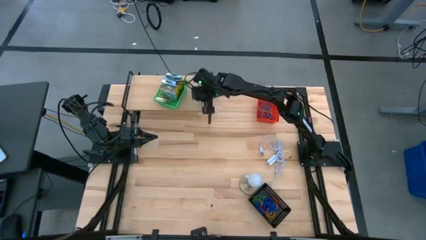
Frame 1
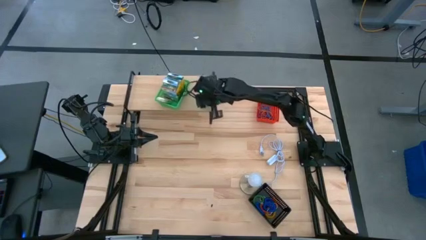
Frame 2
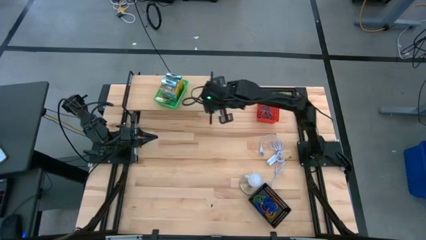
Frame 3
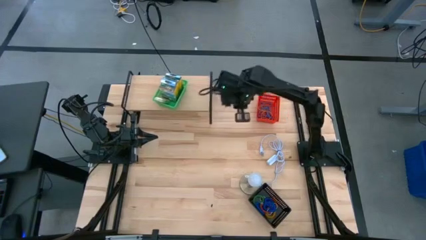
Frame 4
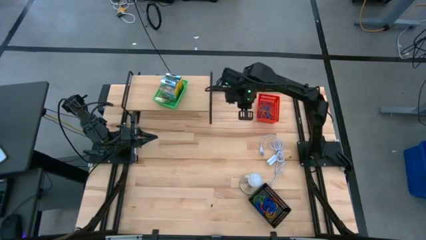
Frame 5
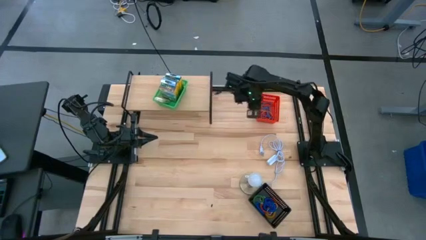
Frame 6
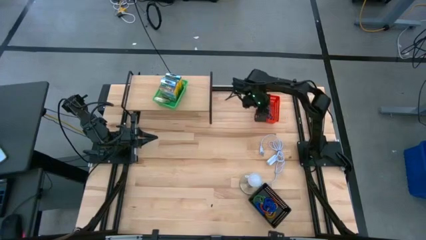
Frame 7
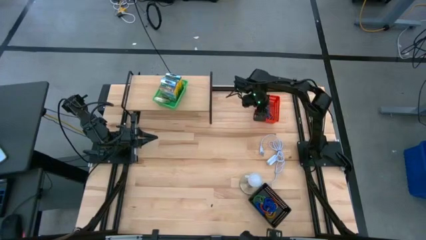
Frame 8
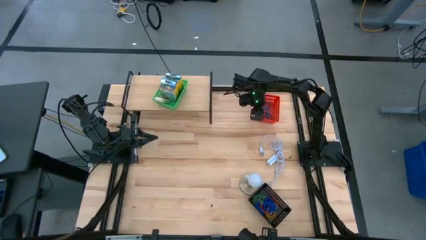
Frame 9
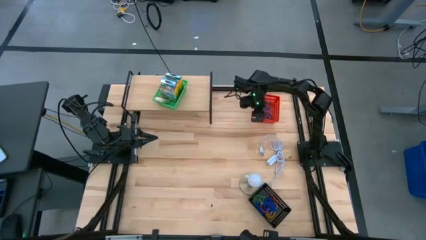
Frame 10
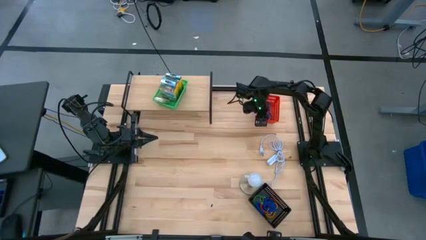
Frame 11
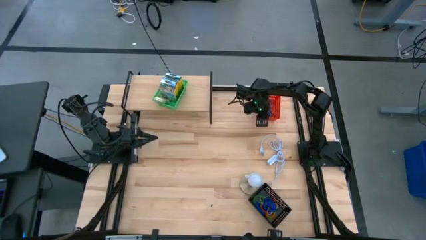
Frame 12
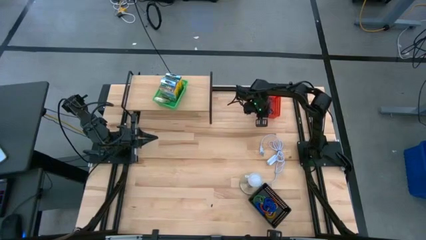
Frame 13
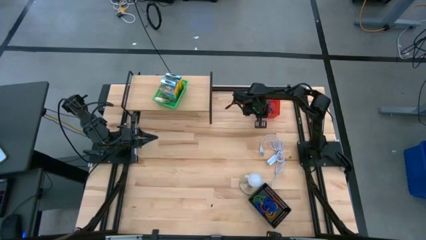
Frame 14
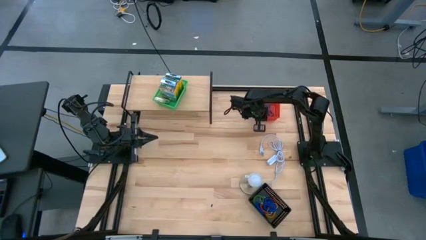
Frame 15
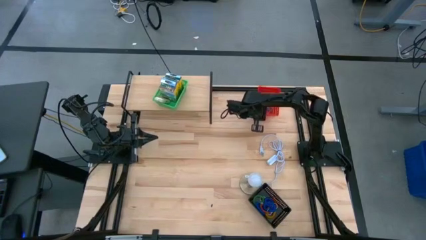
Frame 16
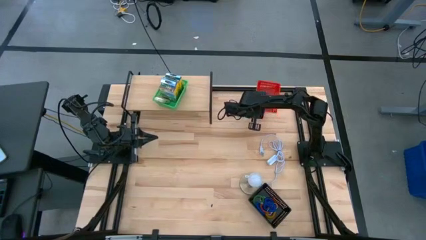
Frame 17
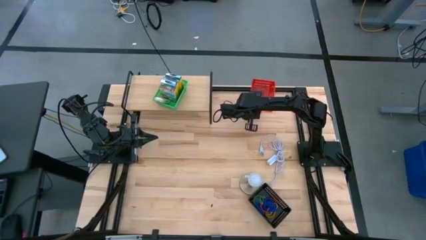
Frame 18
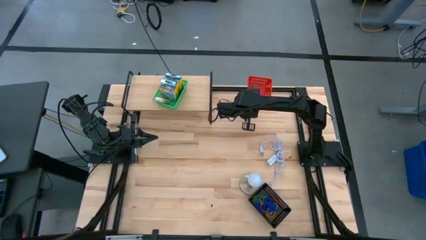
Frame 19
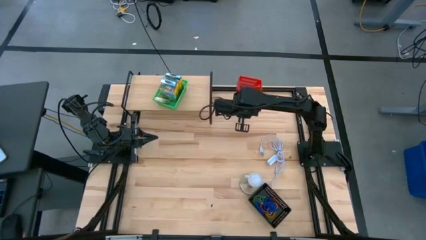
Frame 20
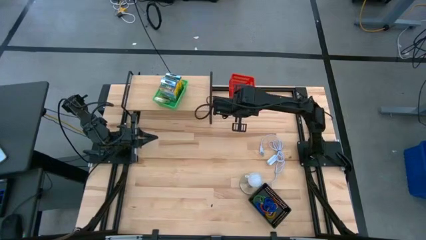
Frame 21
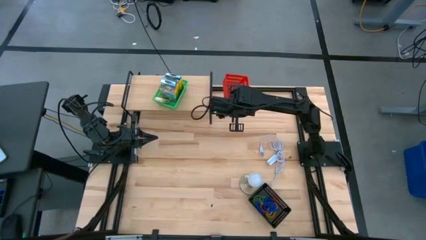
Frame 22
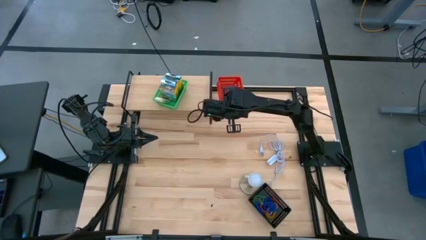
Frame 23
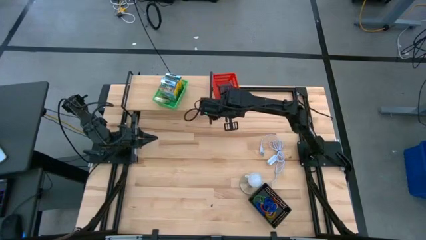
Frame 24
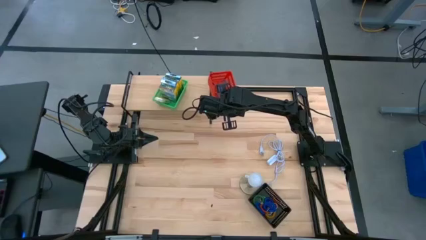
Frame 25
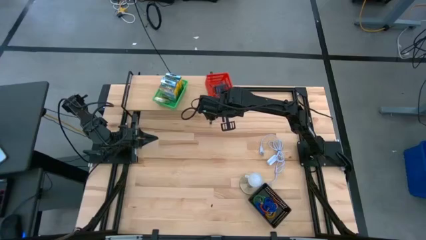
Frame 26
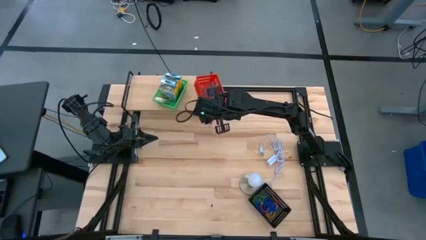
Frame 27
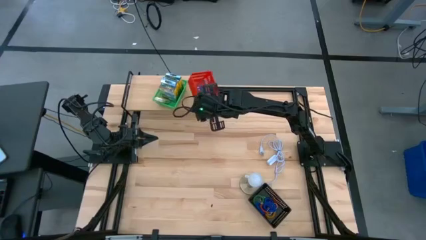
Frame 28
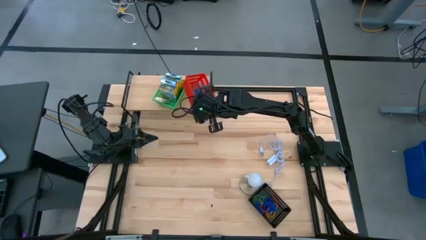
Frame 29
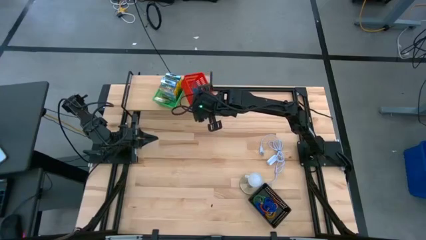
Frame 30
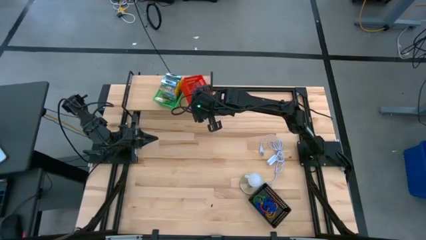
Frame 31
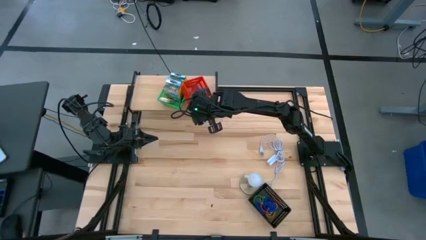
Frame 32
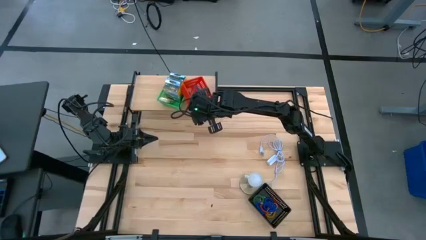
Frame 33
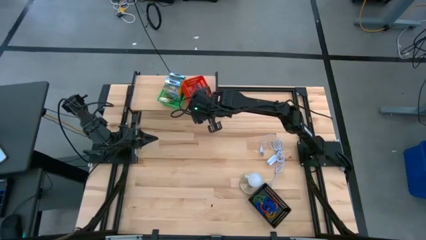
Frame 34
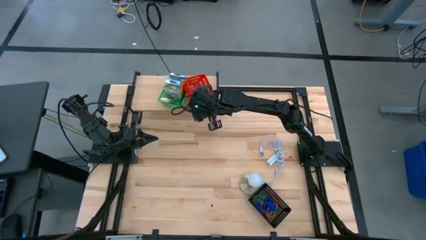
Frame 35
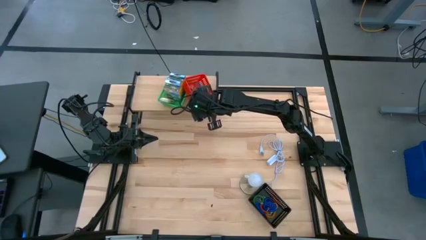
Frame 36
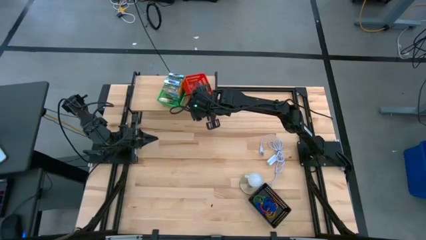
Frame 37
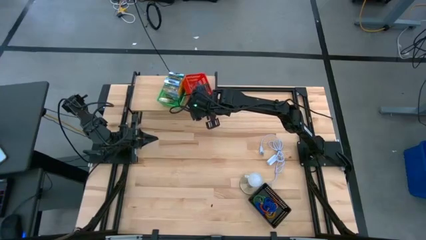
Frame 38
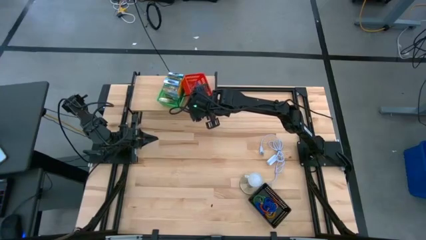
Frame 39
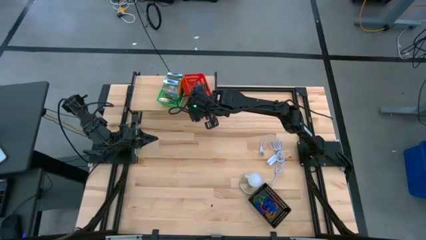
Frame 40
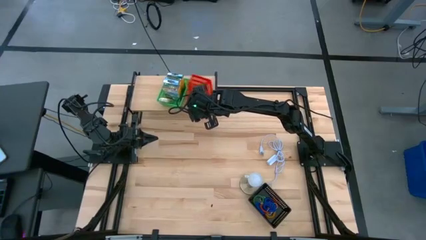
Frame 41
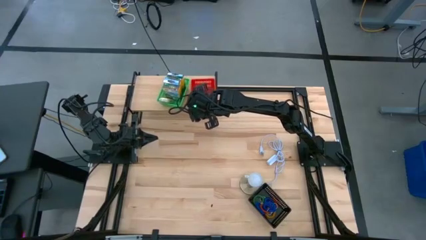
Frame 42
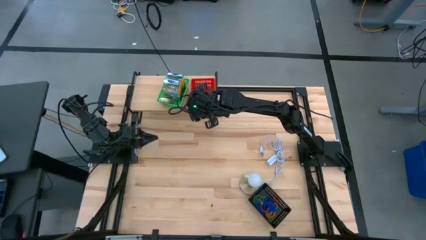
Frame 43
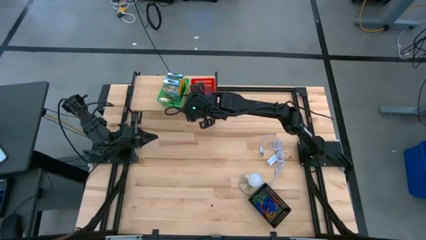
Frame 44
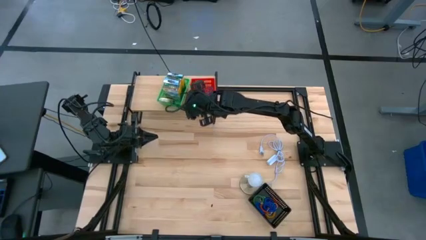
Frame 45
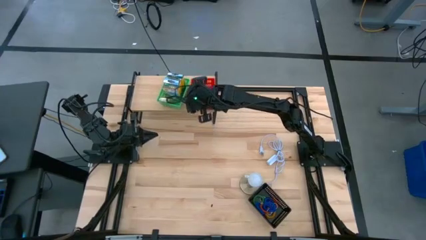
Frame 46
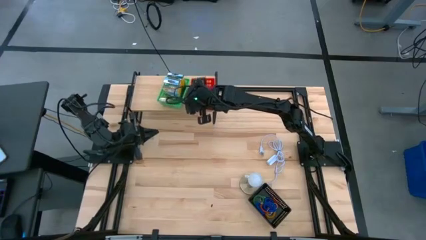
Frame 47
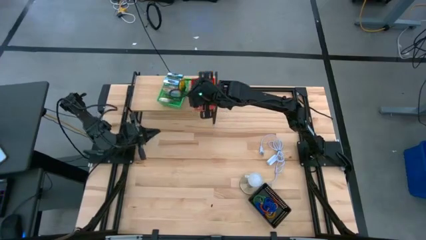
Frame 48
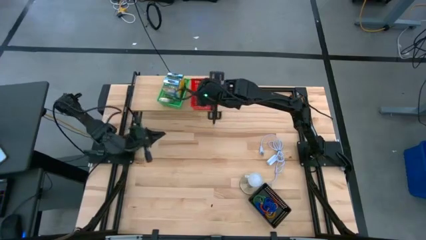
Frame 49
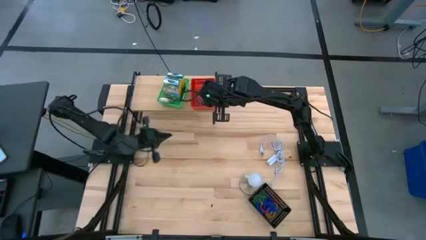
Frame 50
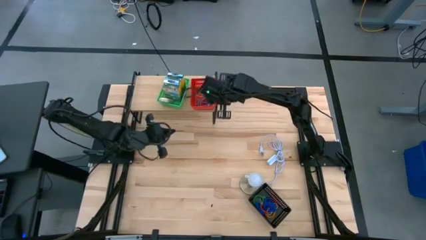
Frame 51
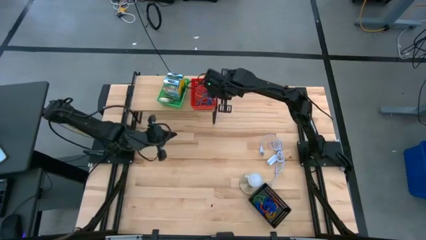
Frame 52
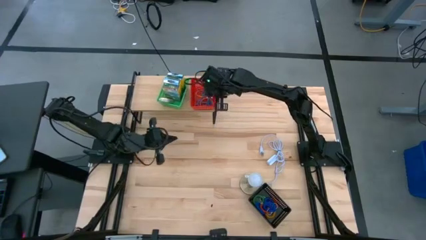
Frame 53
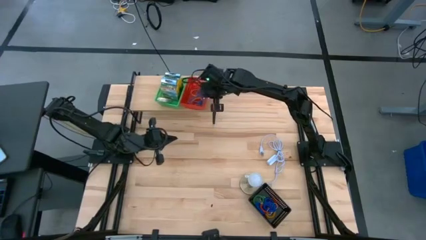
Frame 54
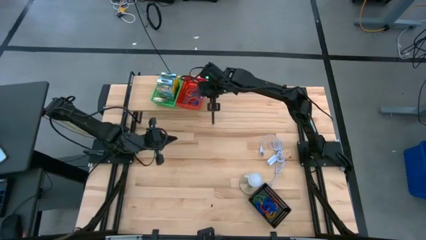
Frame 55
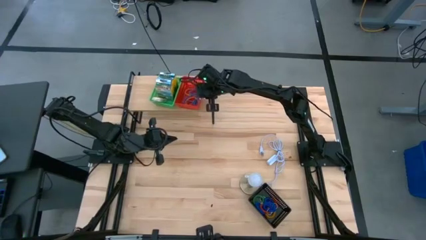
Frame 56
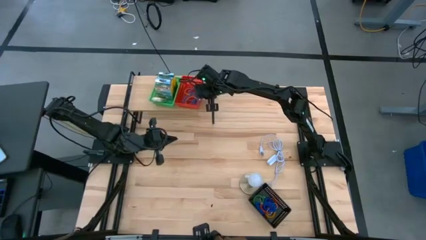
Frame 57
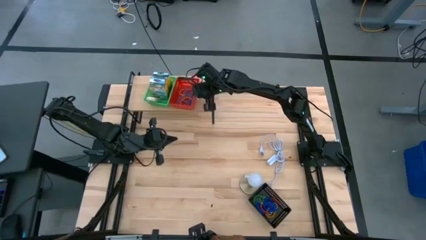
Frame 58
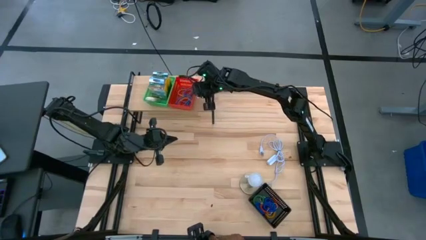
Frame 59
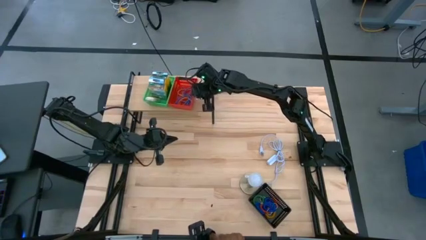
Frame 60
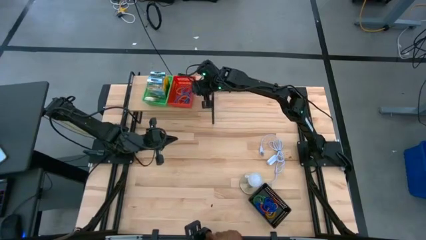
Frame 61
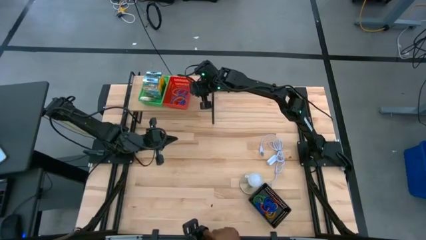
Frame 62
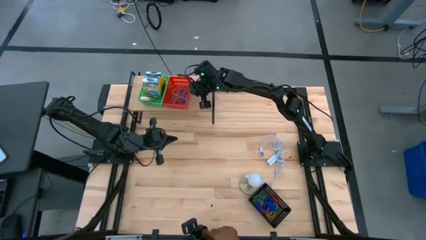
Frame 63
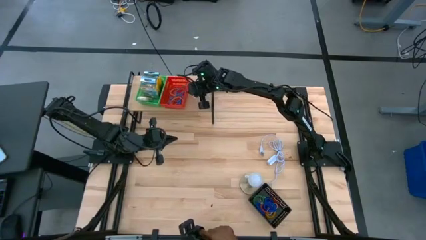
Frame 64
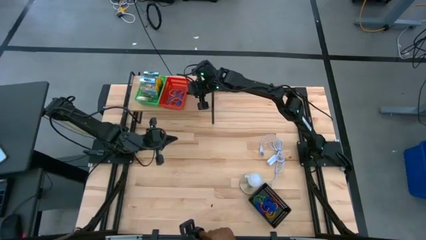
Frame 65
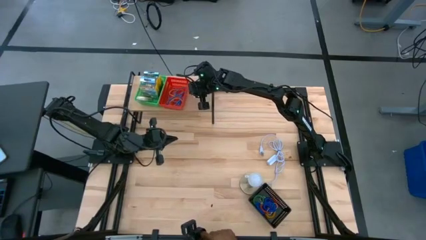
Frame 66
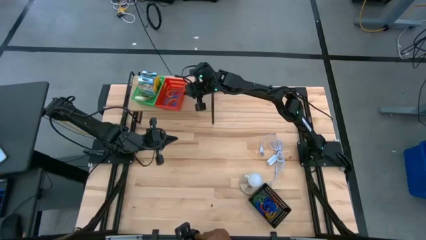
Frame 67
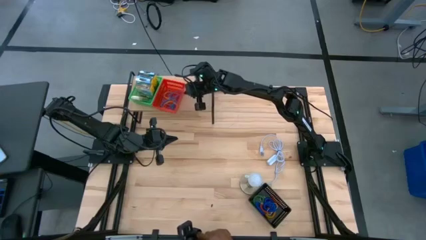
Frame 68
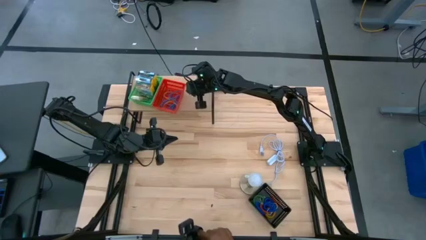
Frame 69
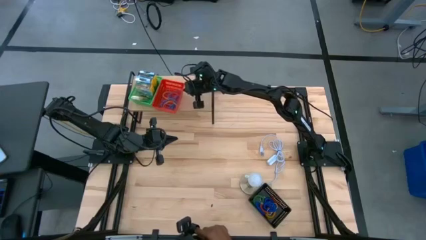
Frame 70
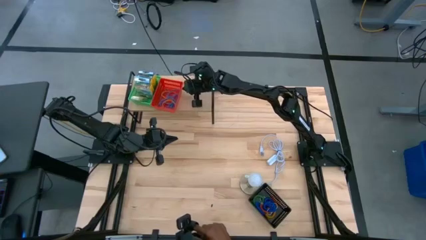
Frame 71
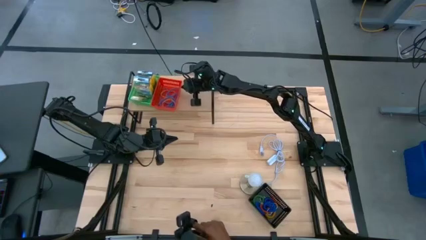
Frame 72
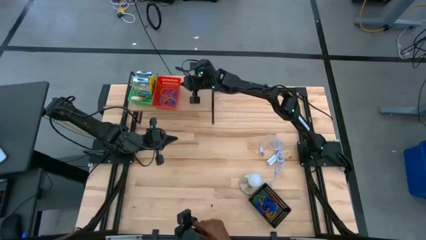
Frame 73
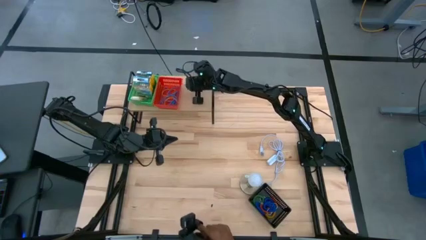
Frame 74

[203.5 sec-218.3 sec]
Task: Pick & Place Office Desk Supplies
Put the red basket on the shelf

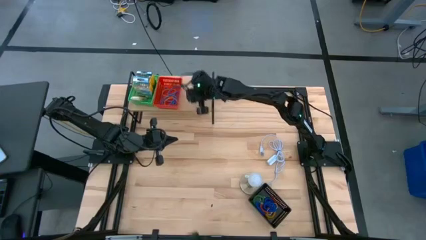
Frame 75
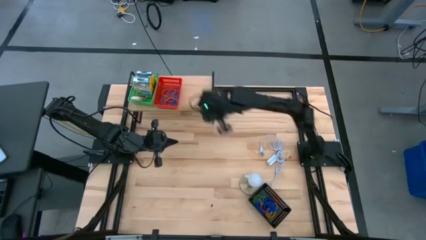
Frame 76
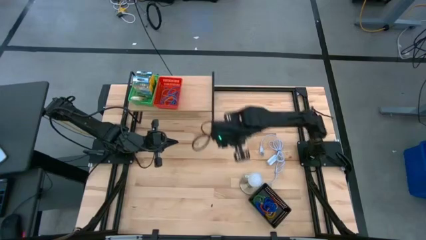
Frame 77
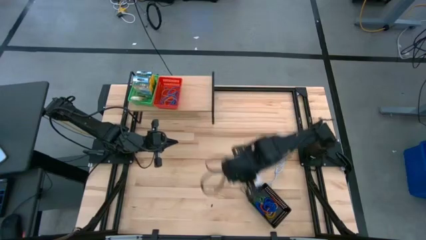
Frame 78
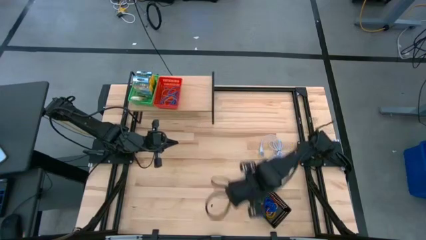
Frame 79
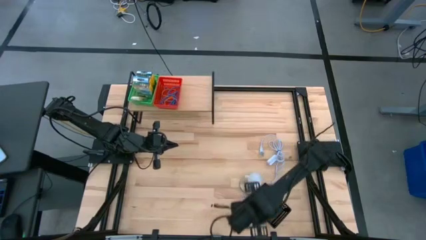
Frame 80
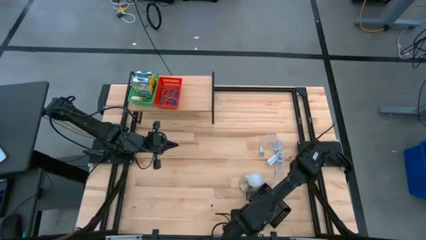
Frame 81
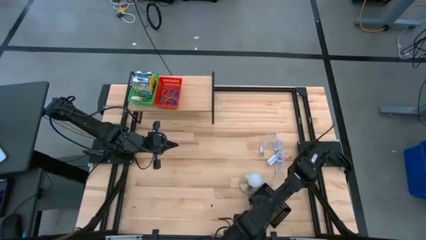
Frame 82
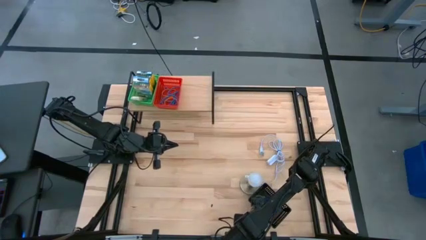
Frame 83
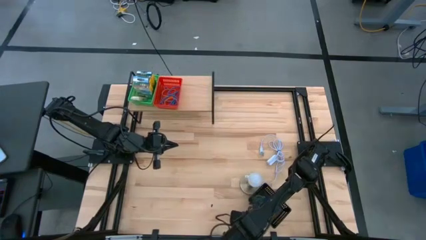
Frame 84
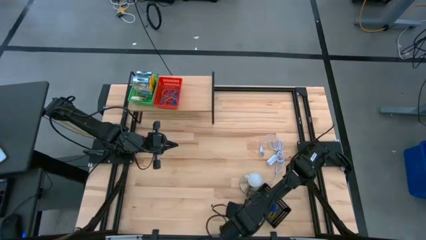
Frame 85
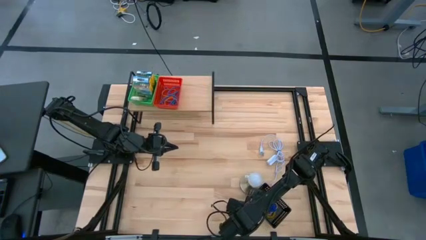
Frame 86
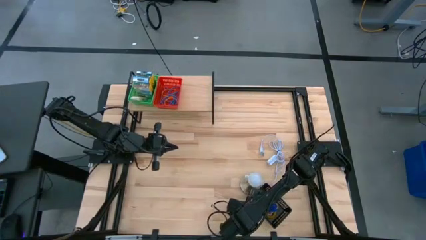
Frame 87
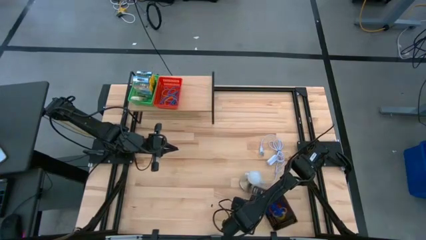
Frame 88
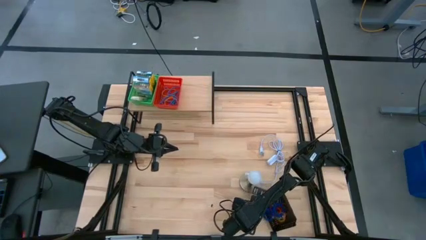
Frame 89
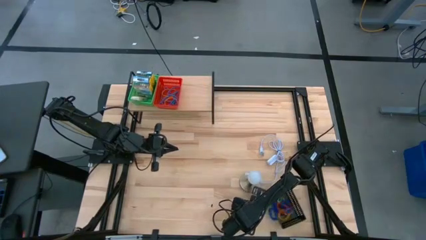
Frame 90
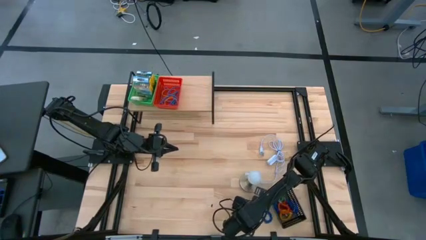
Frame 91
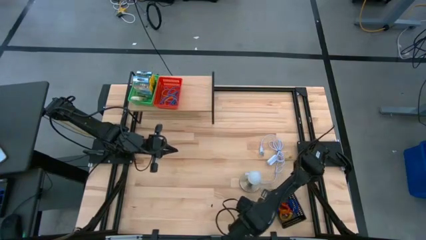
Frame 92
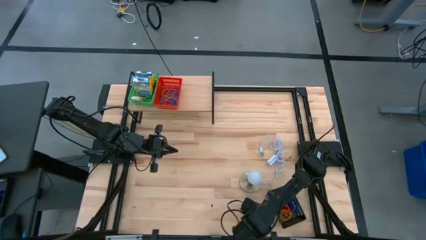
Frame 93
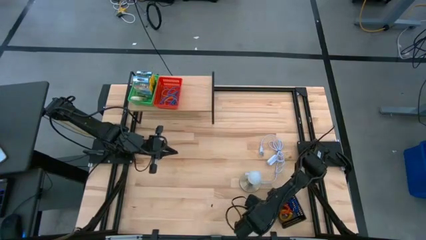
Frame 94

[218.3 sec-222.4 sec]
Put the black basket on the shelf
